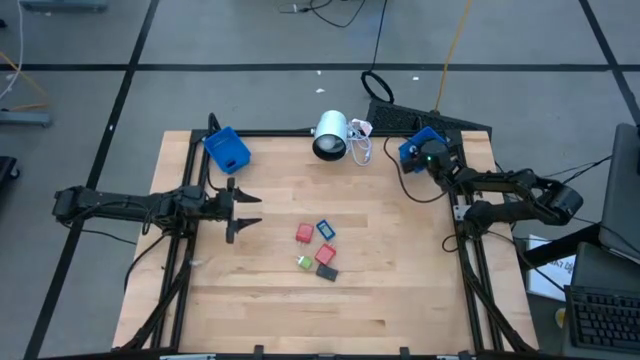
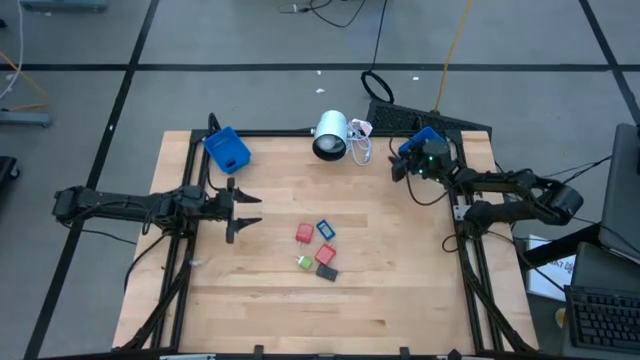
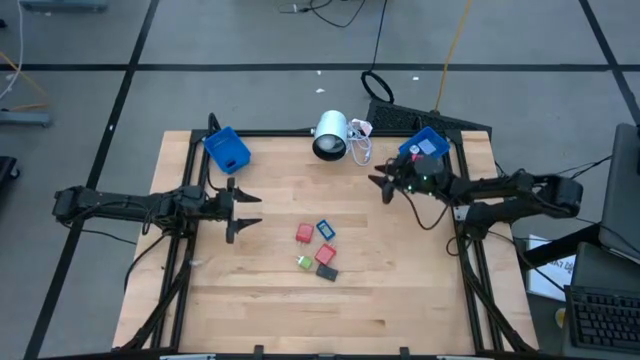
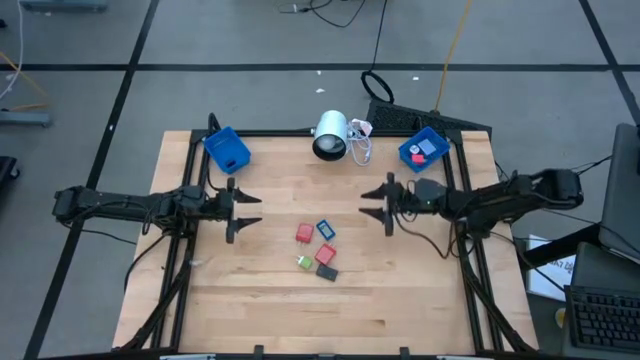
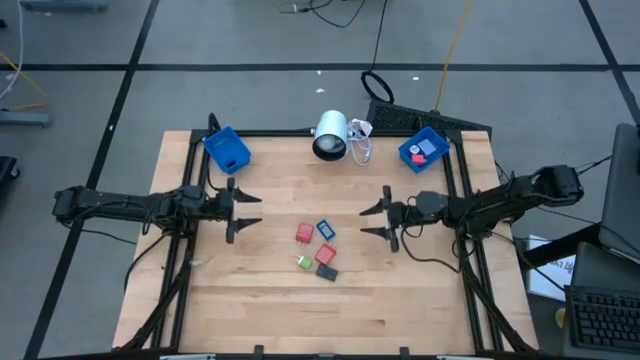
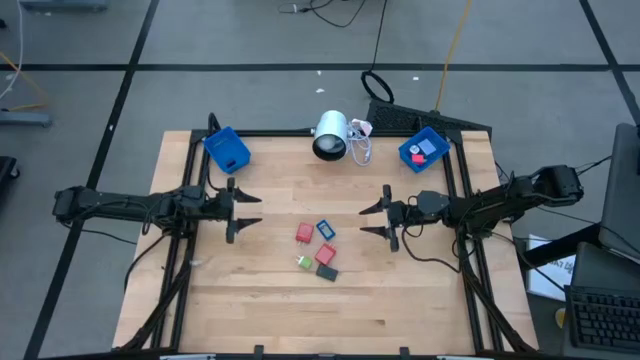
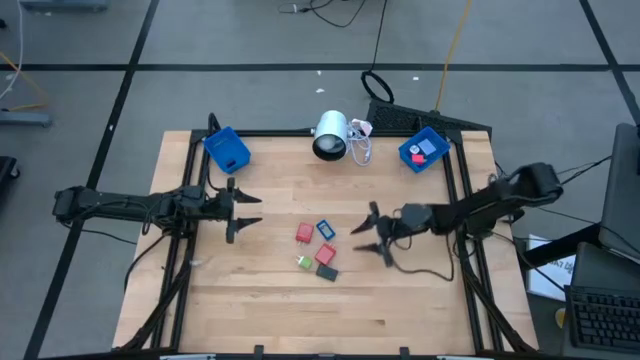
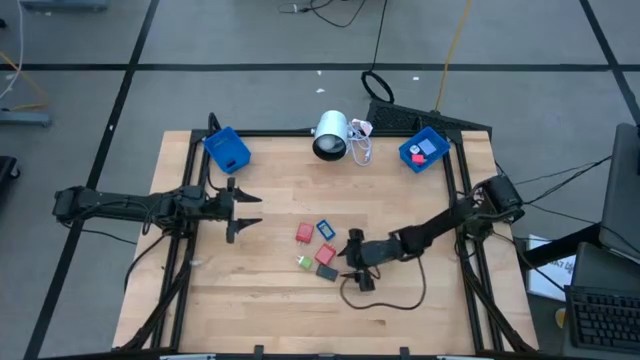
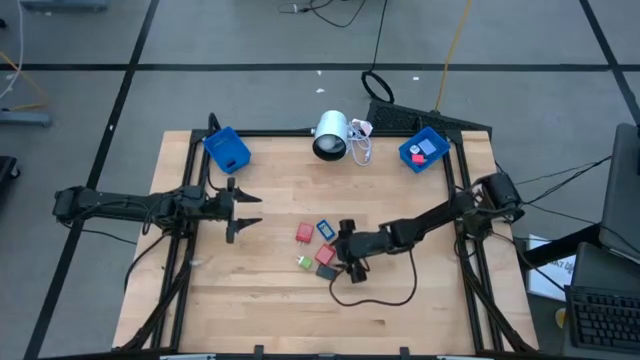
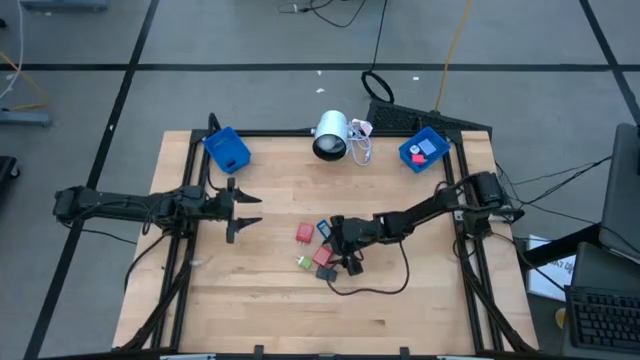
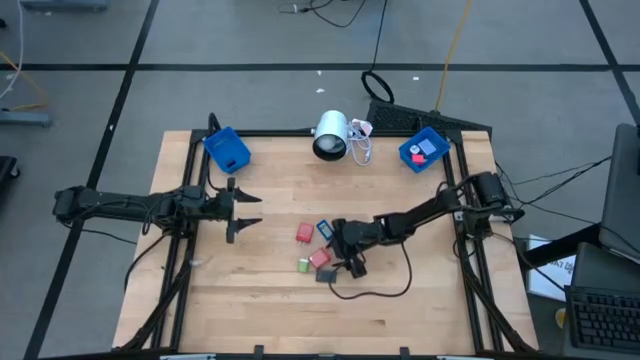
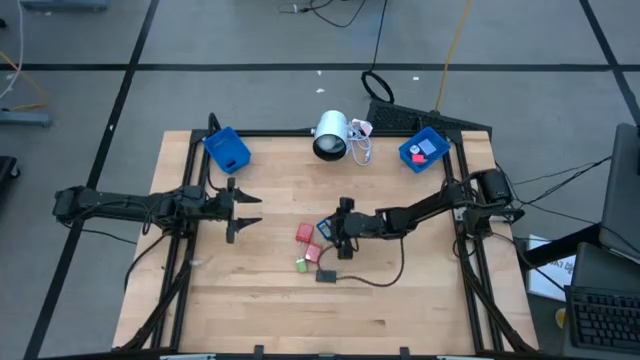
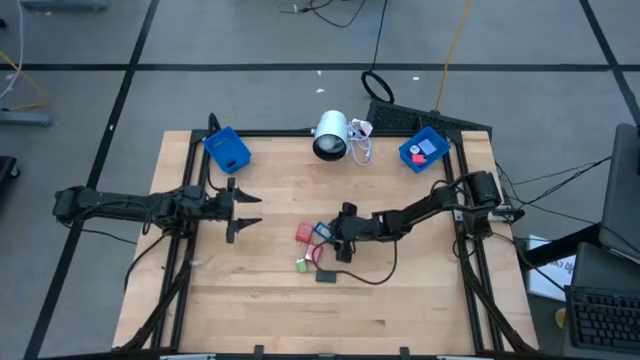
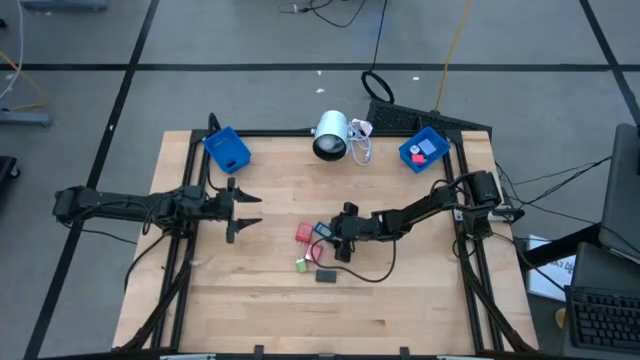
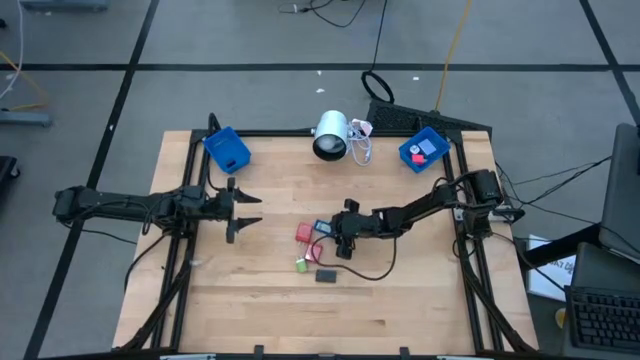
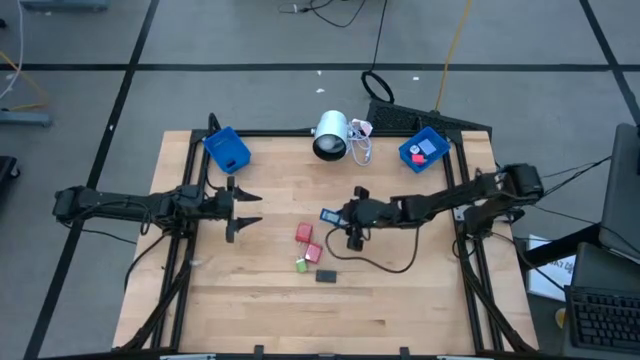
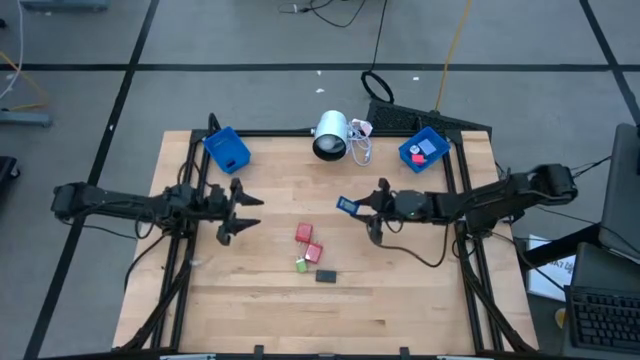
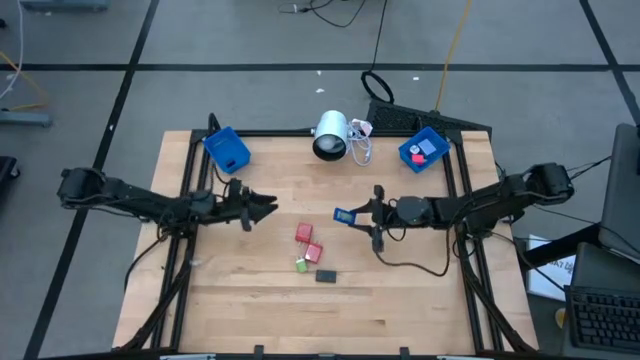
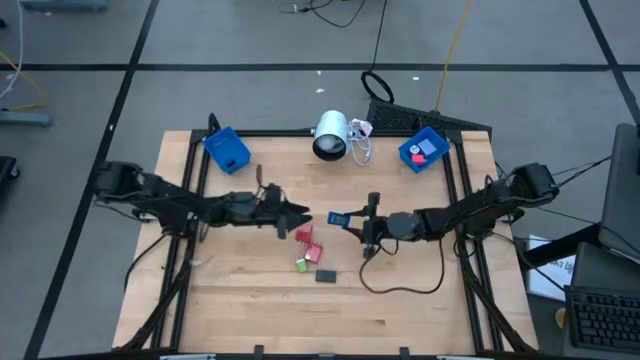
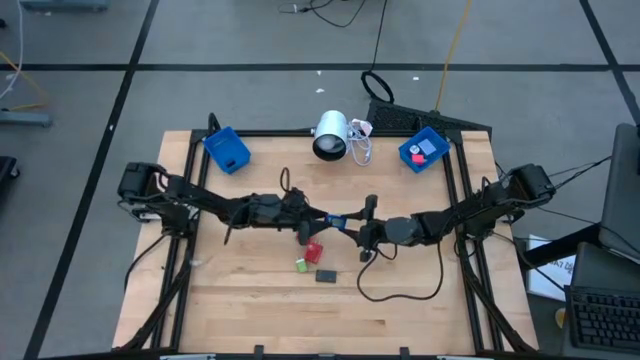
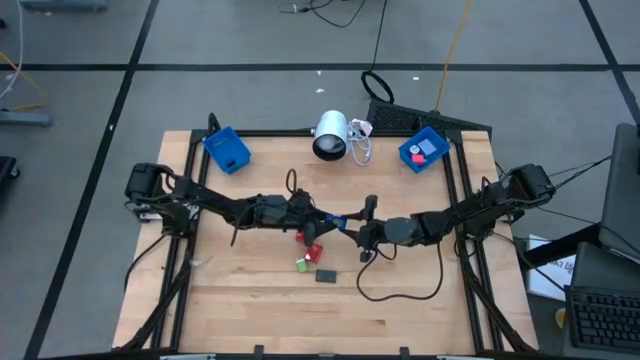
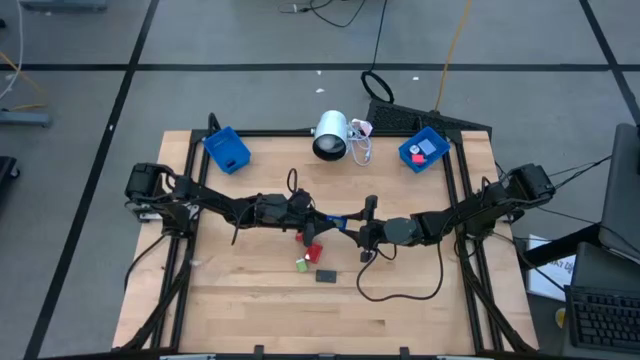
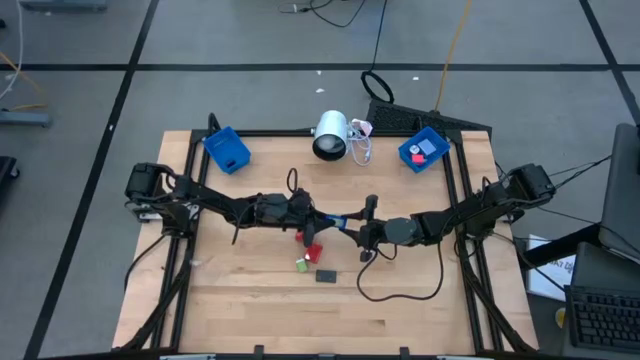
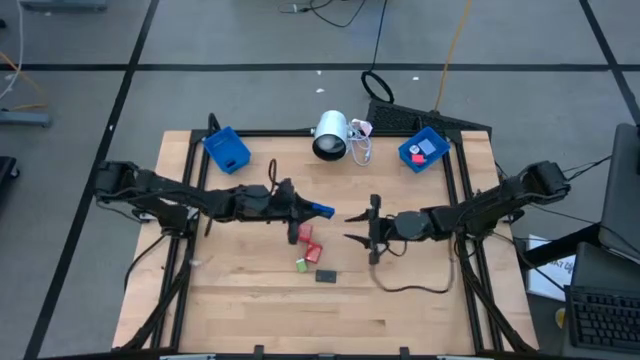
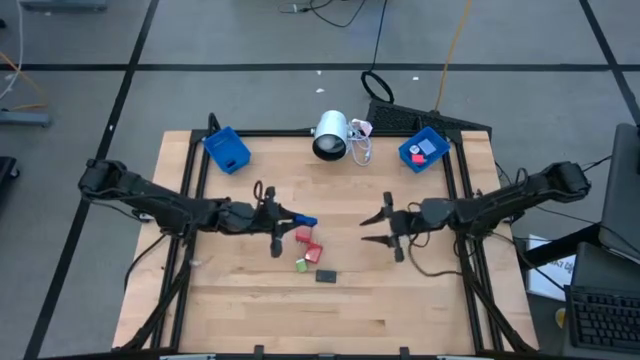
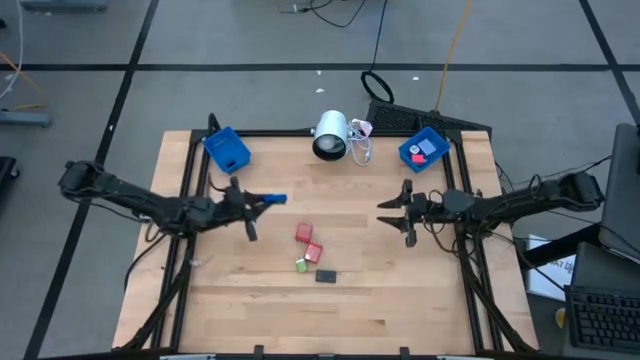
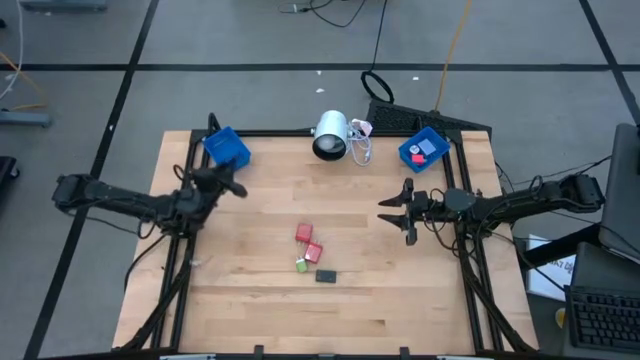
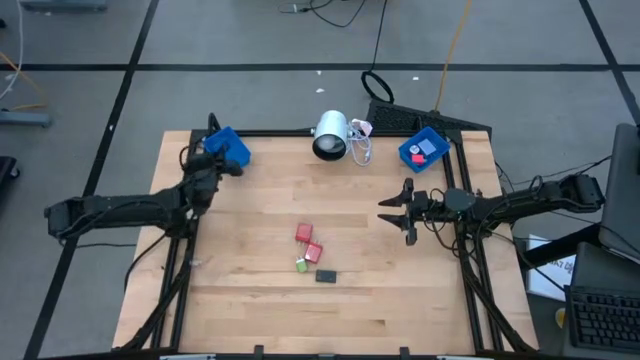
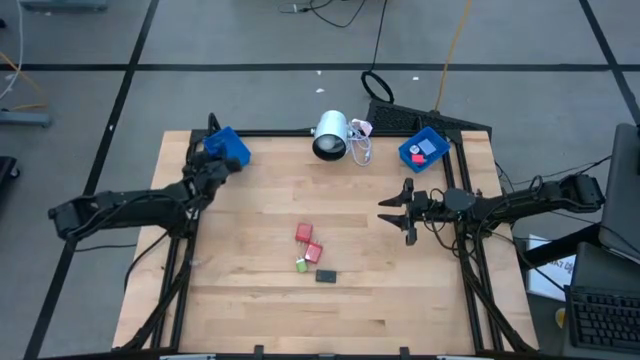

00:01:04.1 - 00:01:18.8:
Task: Pick & Place Office items
Put the blue digital timer into the left blue bin

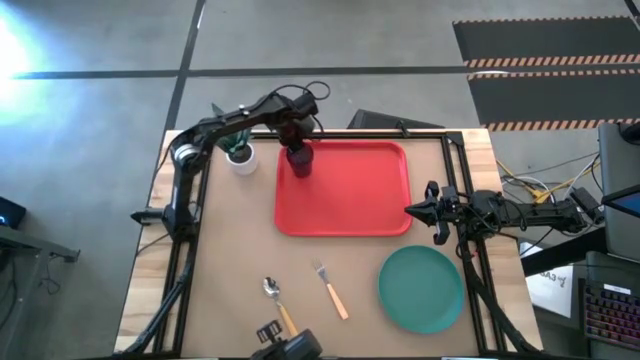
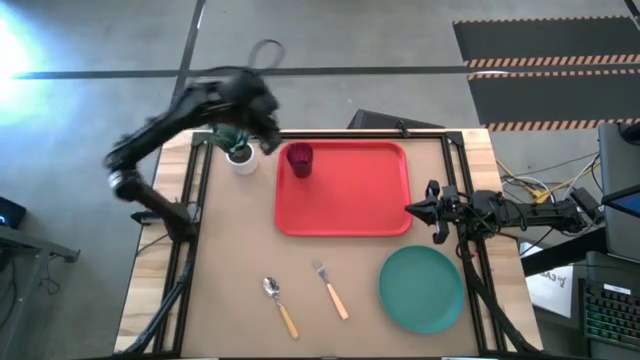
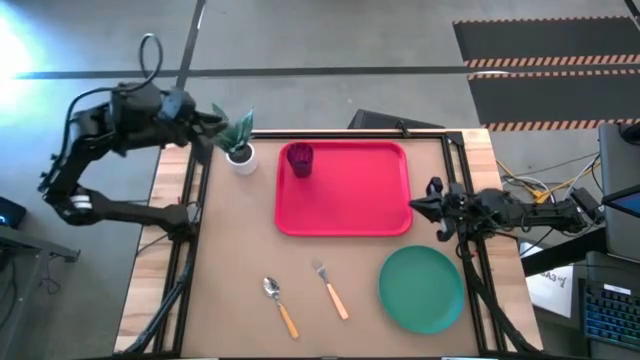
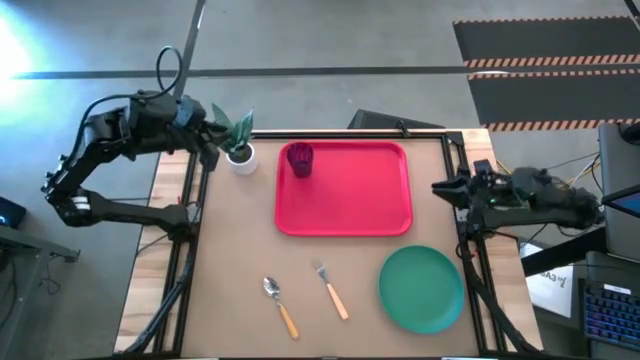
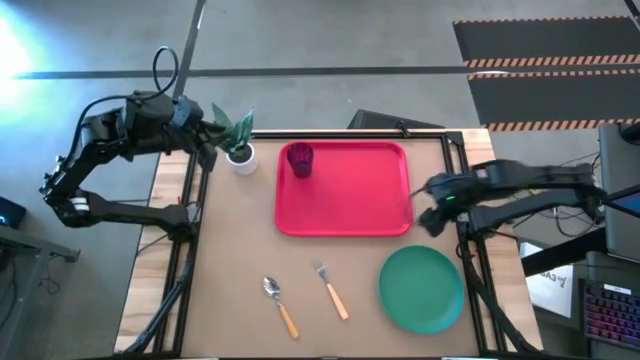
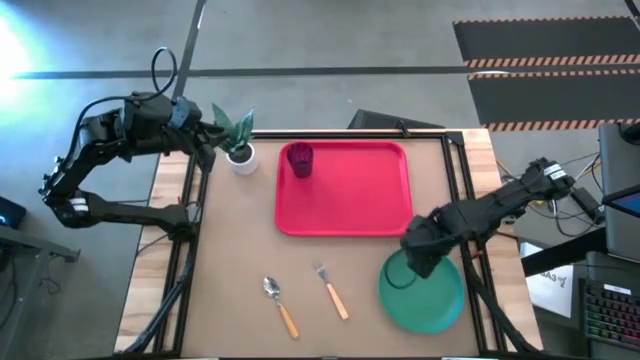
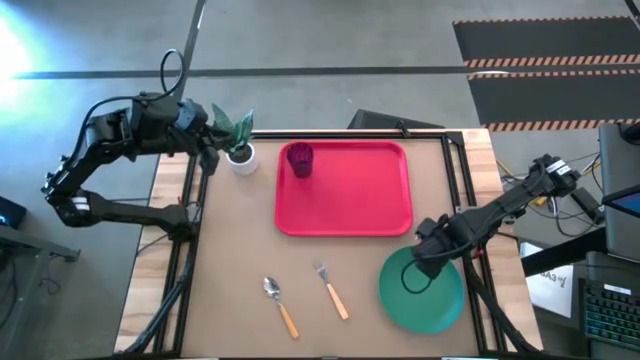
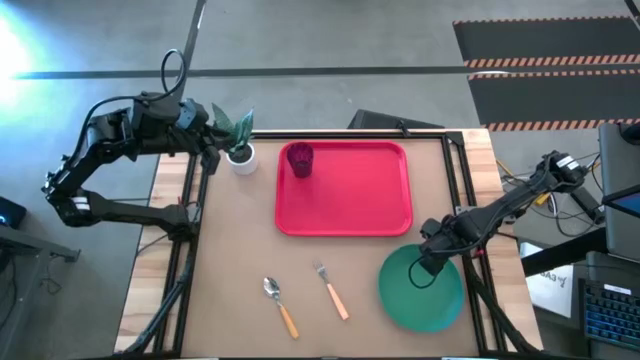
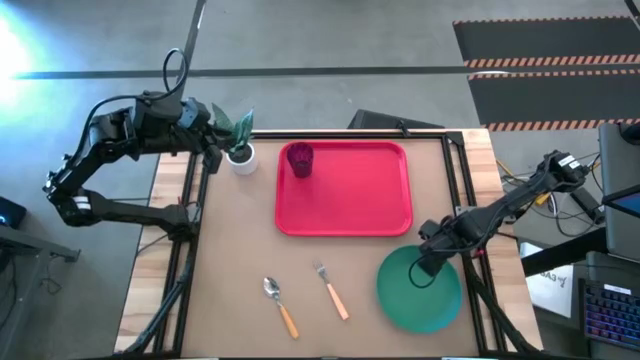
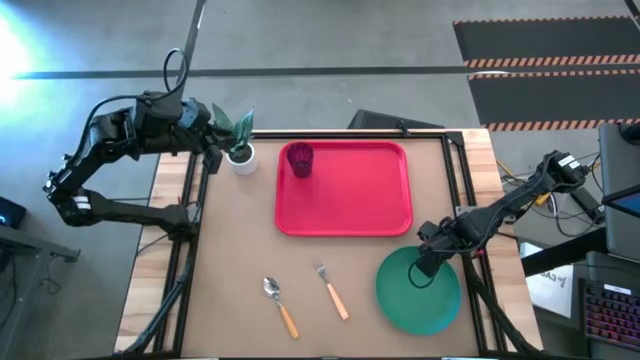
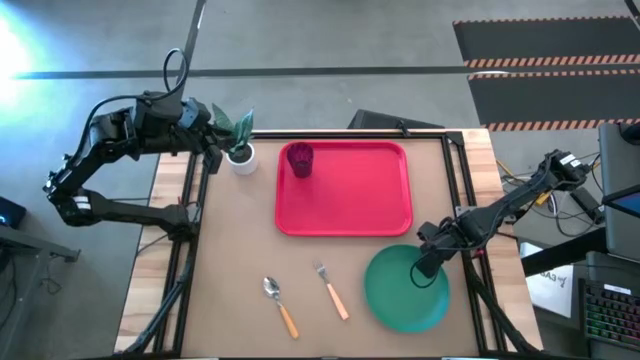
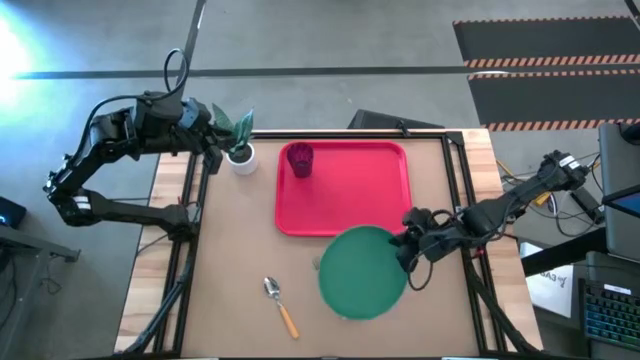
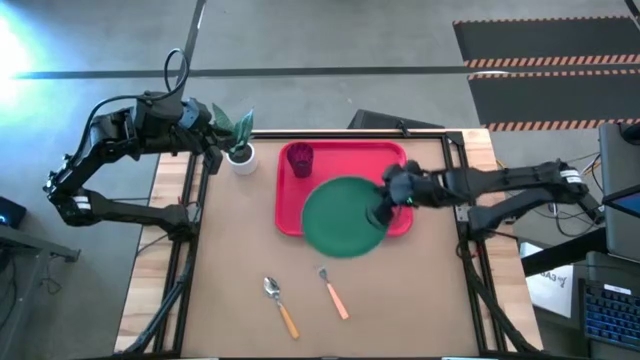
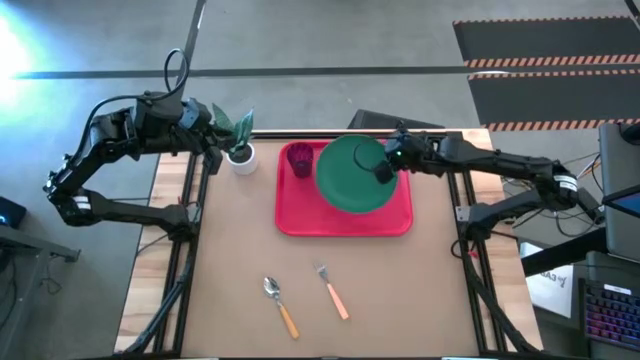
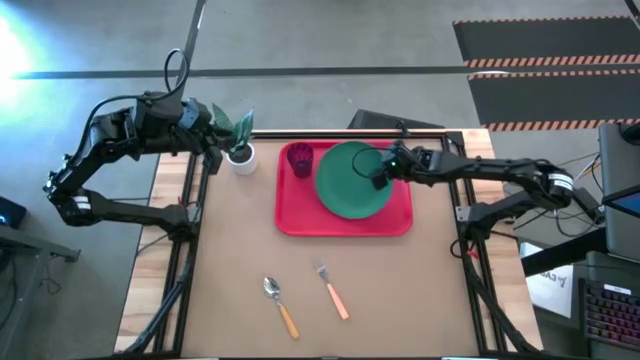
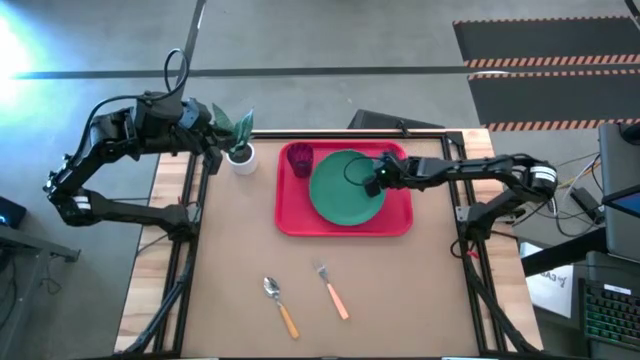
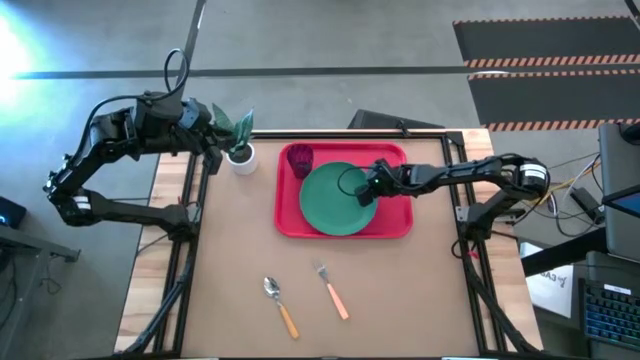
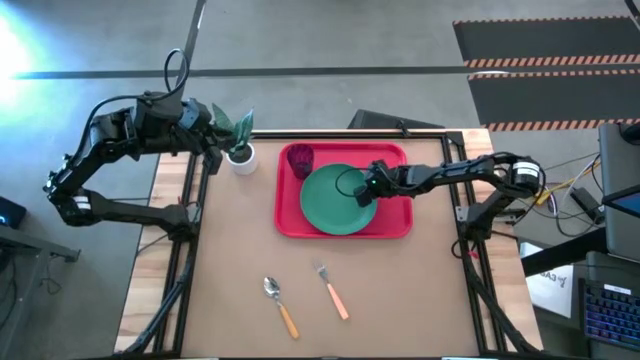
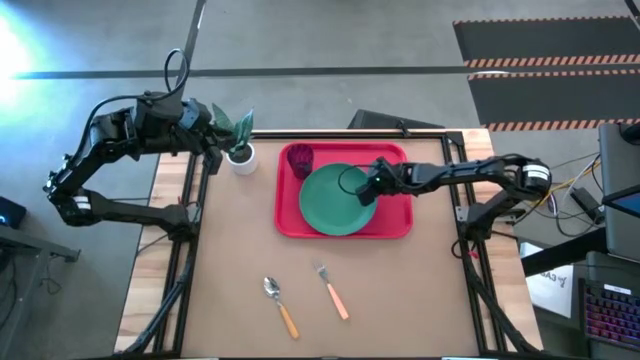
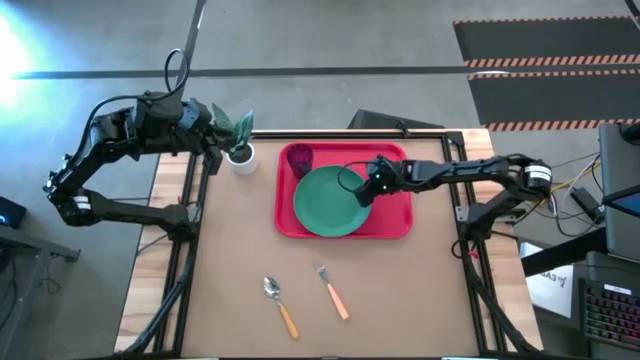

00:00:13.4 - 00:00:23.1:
Task: Pick and place plate/cup/fork/spoon on tray
Put the green plate on the red tray
